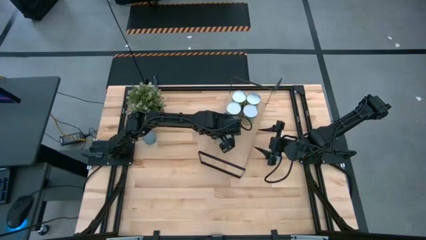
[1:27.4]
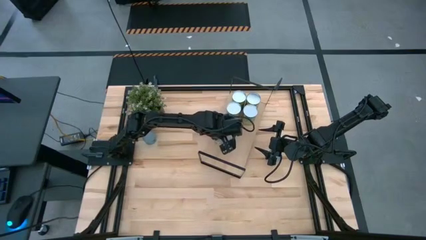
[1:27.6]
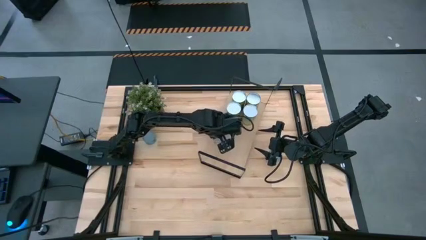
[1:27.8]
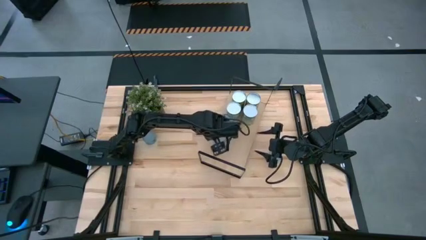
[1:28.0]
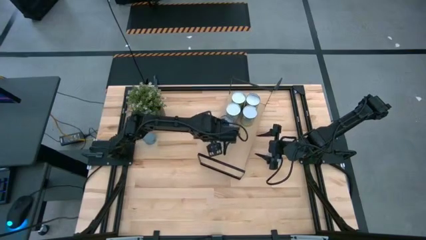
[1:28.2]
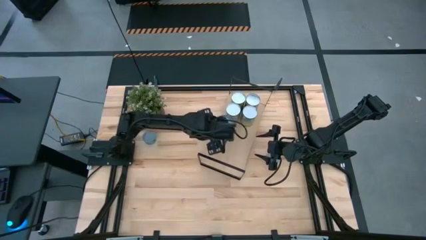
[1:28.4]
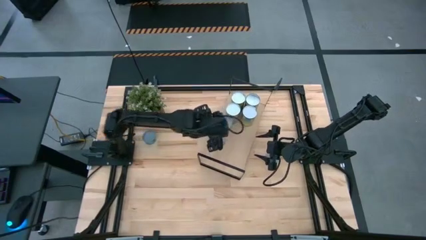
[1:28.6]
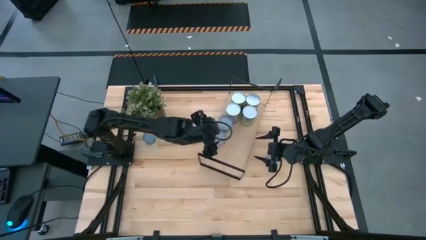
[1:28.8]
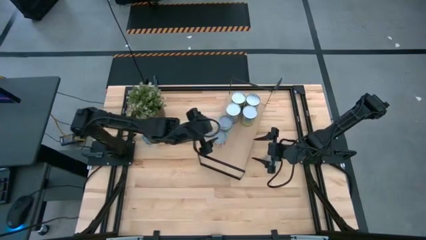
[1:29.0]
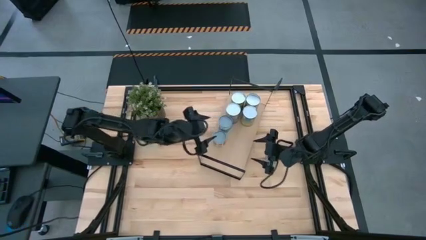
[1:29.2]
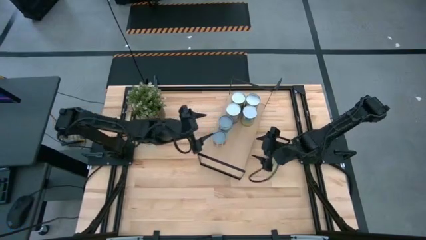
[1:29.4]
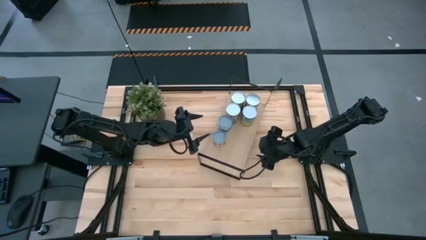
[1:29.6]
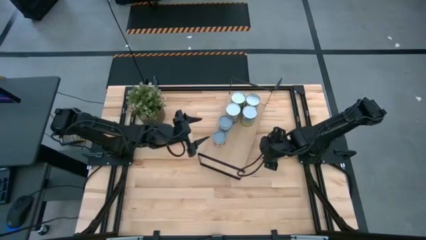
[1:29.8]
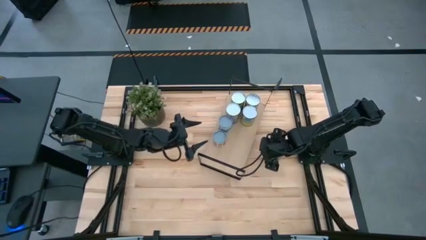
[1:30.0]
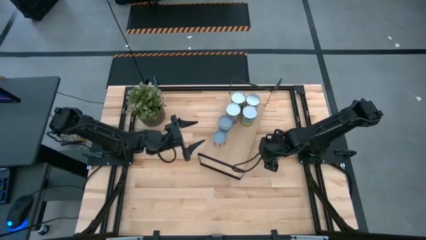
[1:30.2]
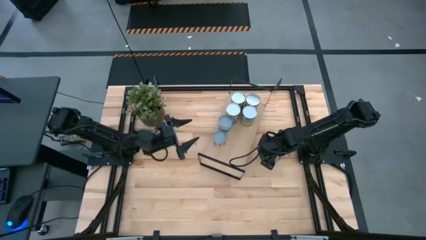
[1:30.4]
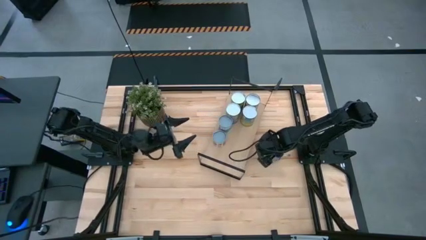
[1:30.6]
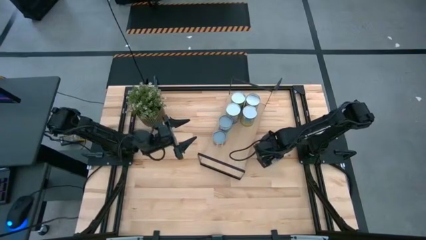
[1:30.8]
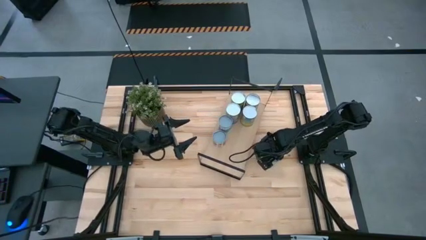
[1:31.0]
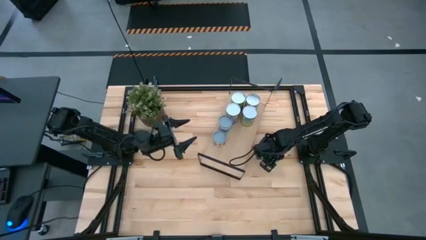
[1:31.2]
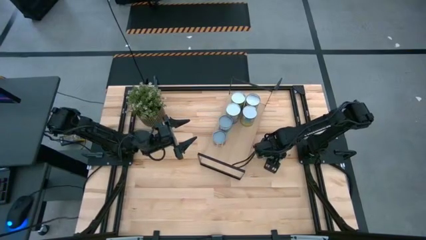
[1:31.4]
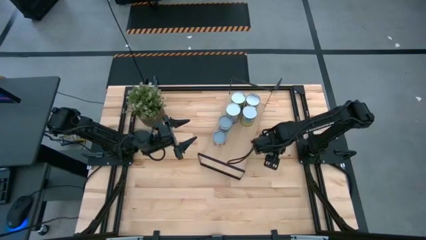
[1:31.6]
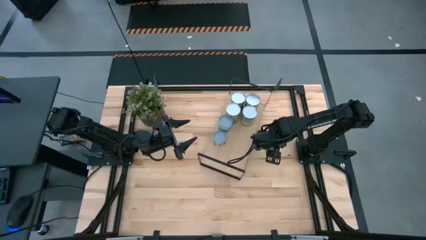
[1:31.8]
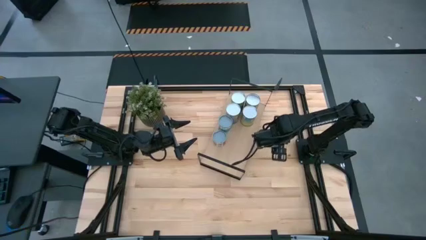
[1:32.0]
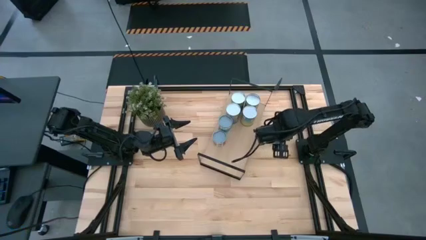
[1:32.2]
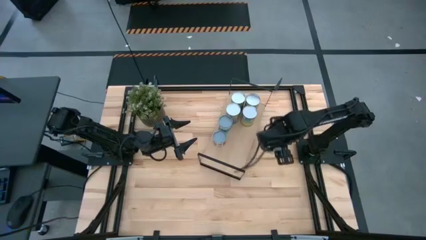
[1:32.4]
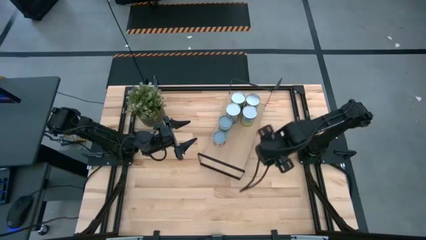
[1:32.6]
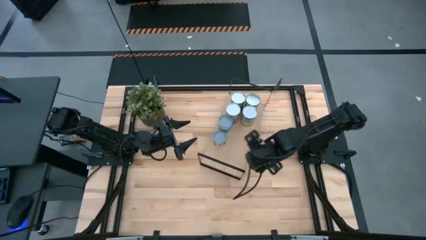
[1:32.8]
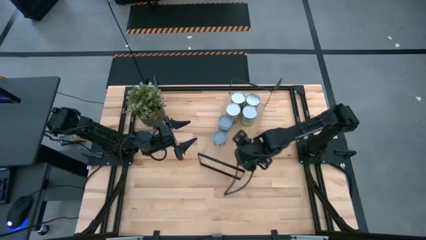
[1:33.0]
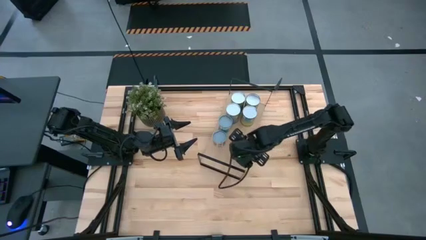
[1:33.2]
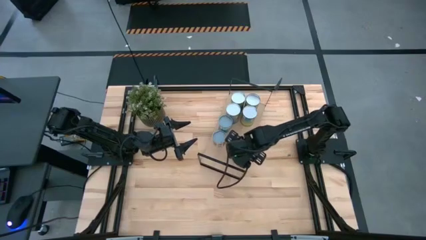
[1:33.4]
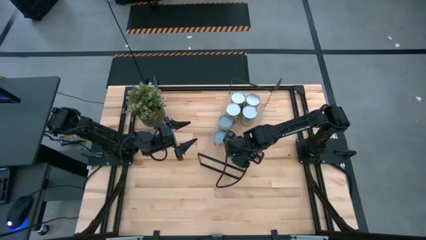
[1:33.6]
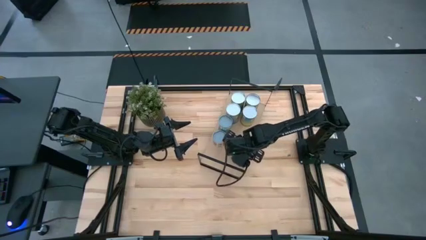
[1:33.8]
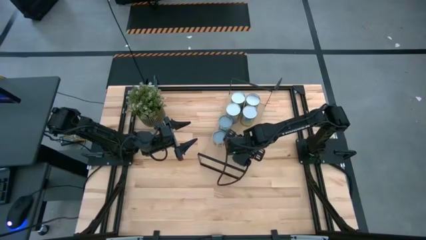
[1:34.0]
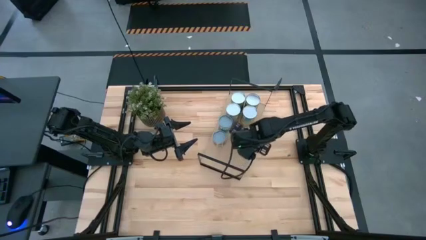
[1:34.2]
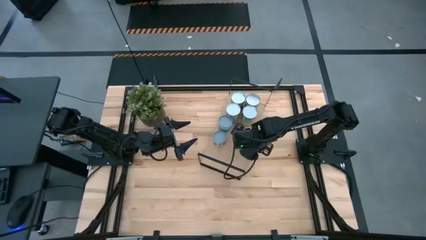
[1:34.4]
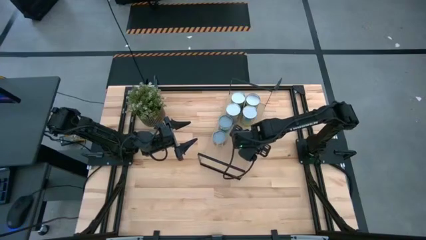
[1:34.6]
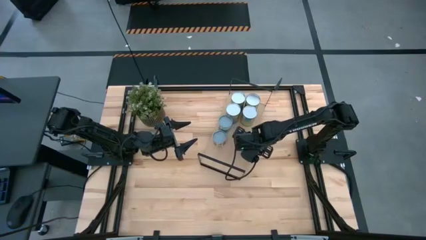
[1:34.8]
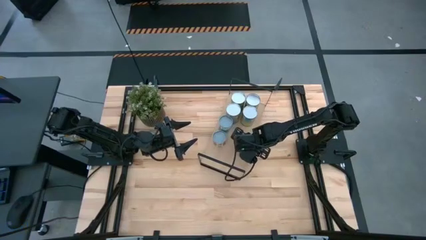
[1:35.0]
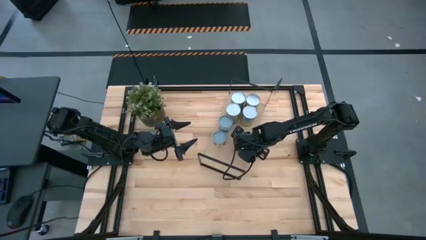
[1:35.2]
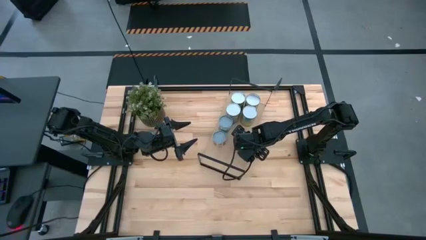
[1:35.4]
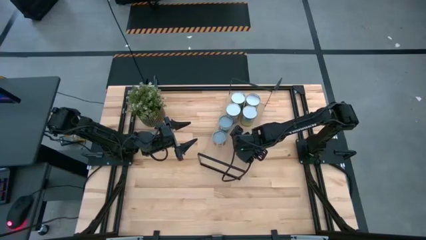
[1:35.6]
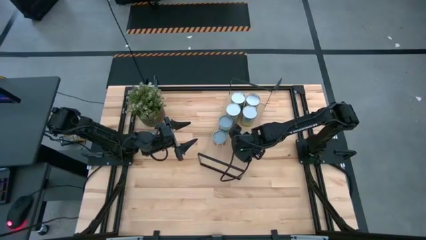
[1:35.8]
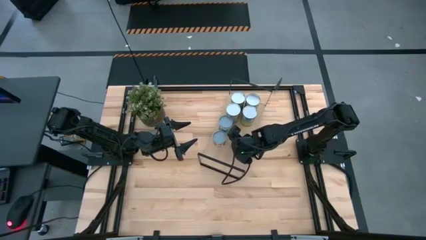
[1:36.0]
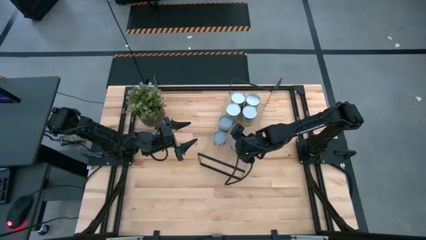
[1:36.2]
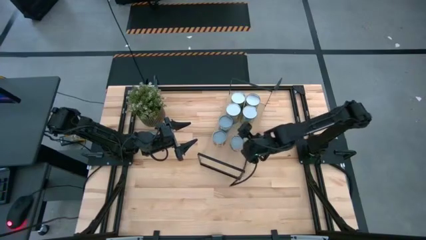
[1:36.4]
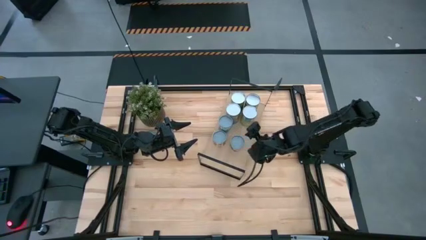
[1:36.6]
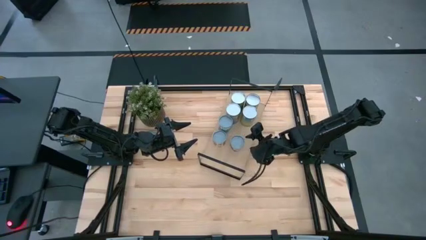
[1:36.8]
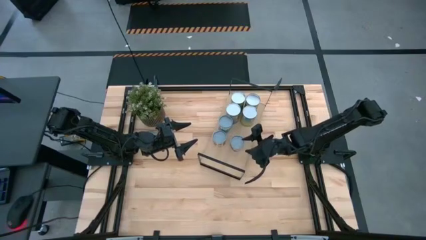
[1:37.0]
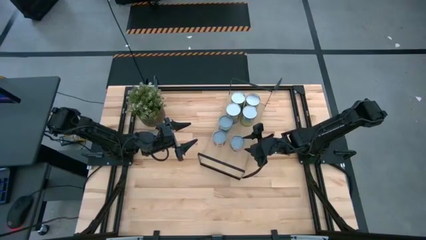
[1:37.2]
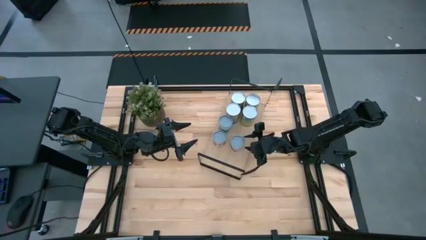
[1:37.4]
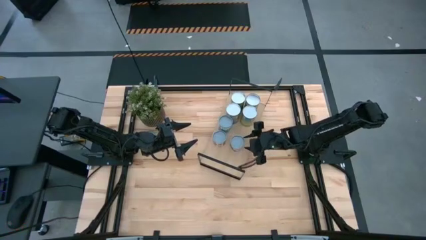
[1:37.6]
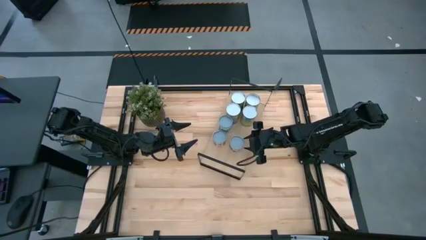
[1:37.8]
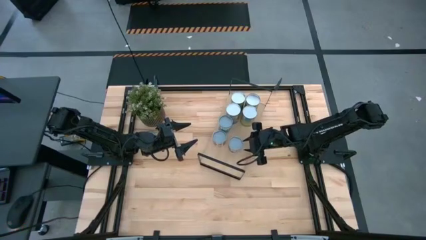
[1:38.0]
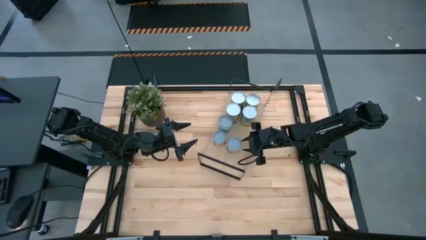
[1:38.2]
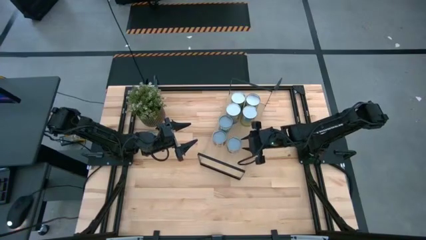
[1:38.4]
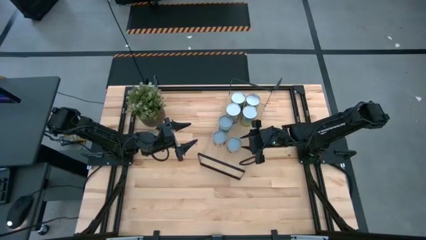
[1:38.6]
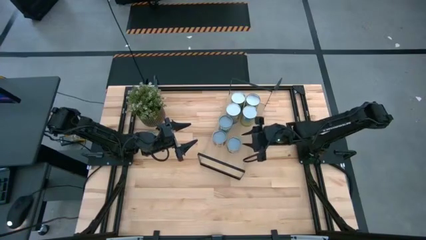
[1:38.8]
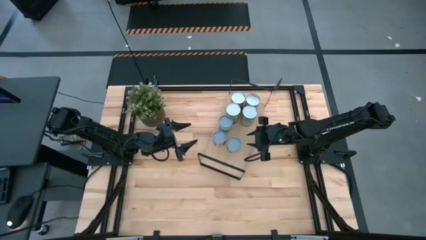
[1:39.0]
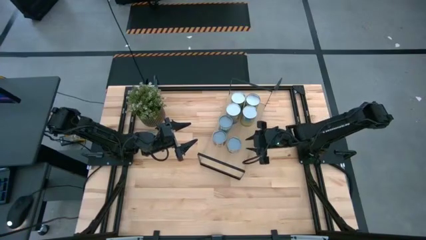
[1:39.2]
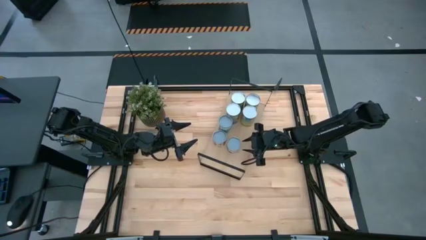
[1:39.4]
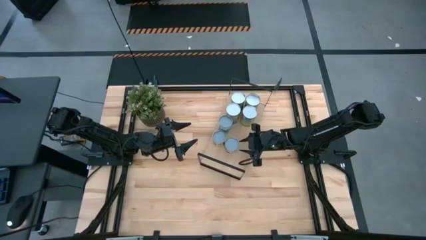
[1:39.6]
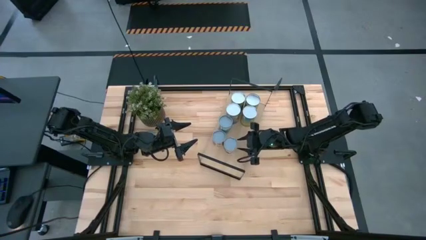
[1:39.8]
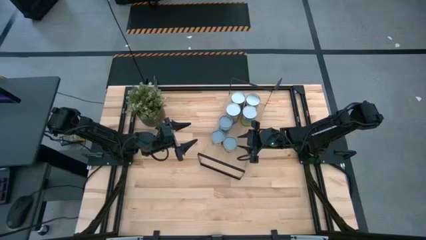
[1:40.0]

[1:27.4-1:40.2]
Task: Pick and place cans onto a shelf
Put the canned green peas on the shelf
